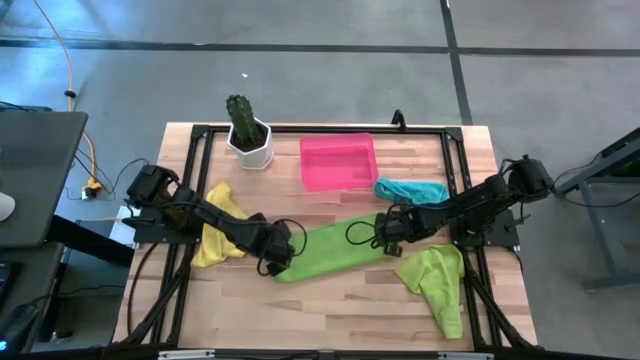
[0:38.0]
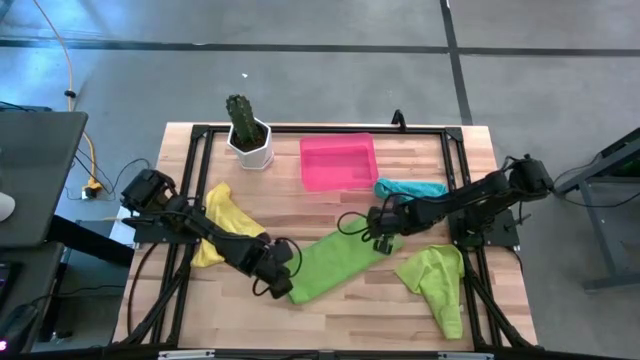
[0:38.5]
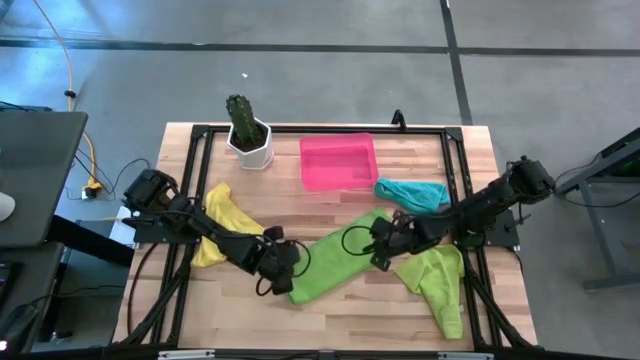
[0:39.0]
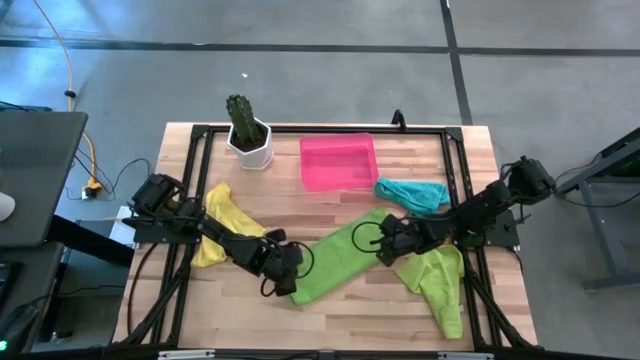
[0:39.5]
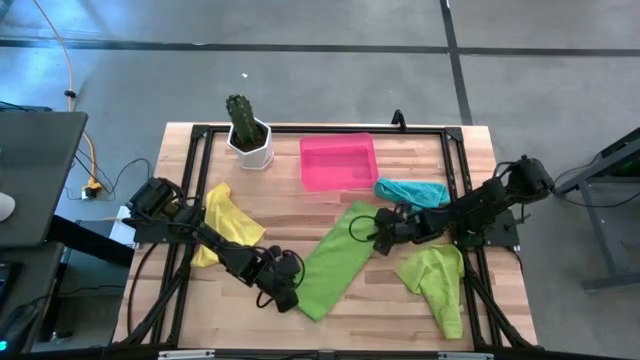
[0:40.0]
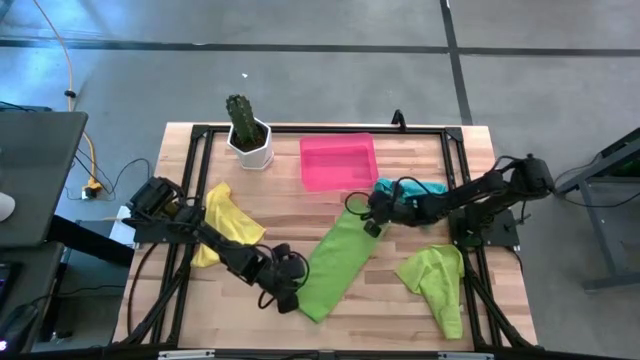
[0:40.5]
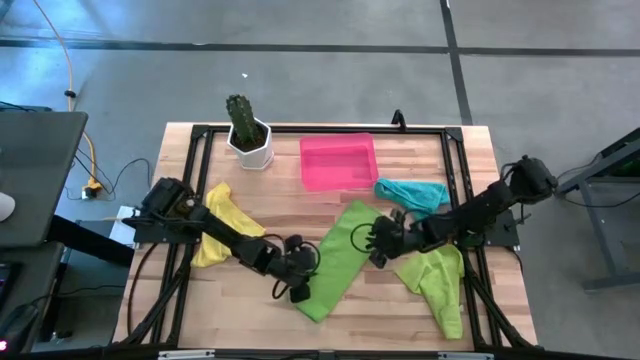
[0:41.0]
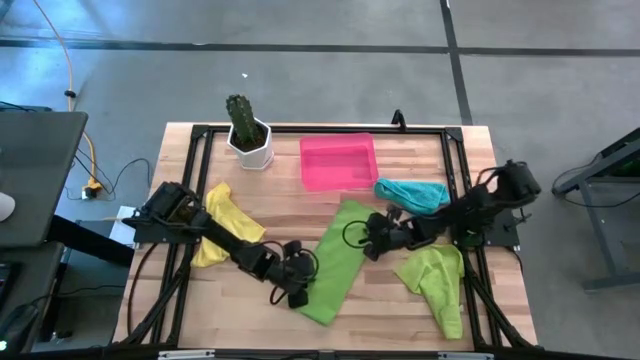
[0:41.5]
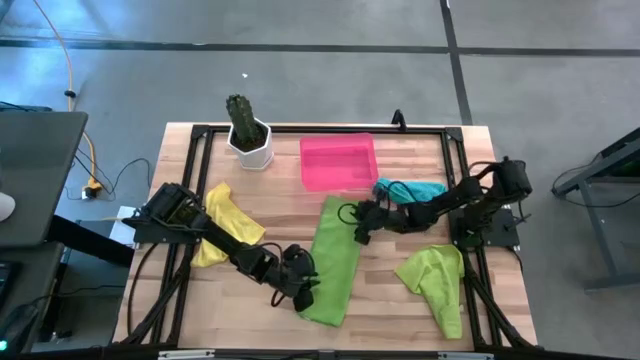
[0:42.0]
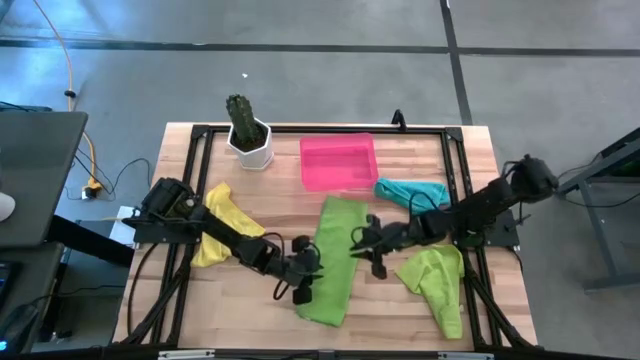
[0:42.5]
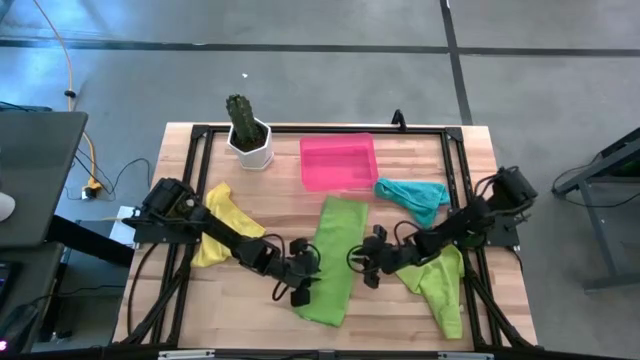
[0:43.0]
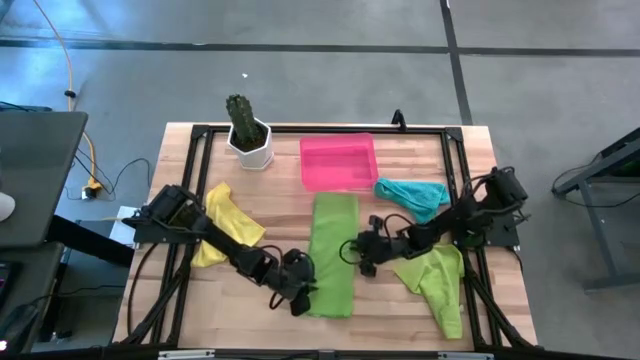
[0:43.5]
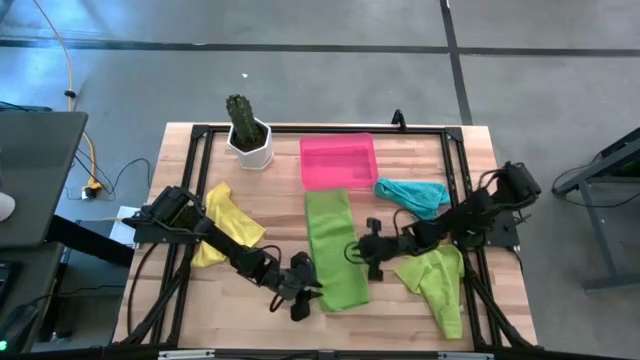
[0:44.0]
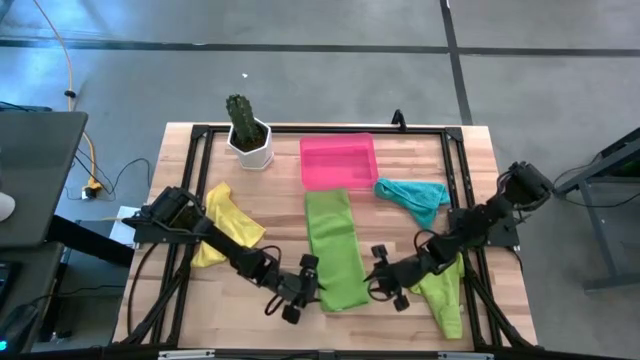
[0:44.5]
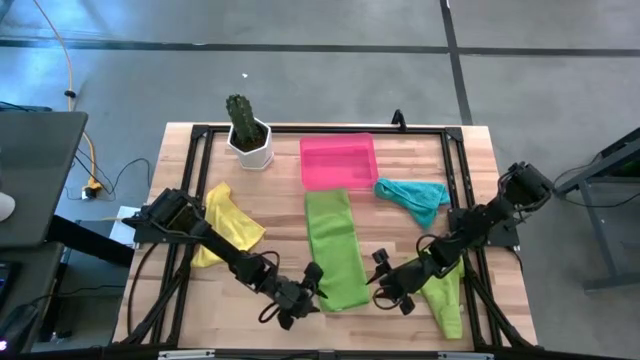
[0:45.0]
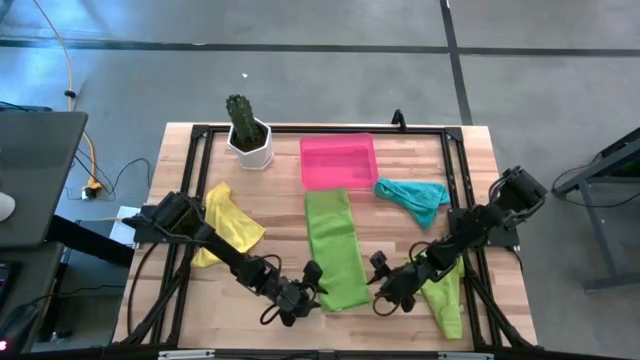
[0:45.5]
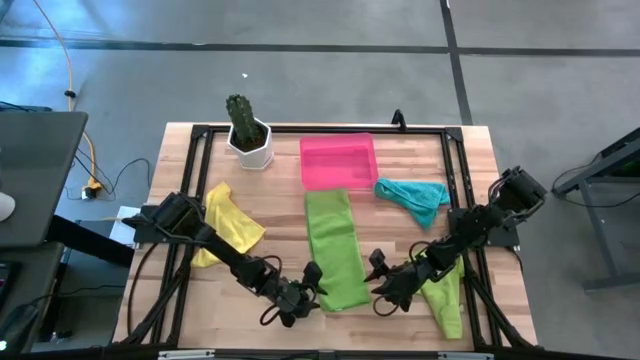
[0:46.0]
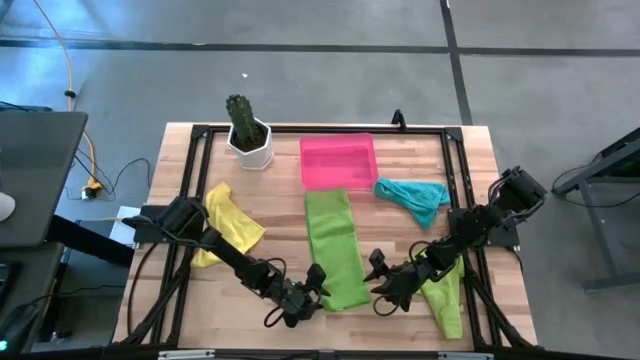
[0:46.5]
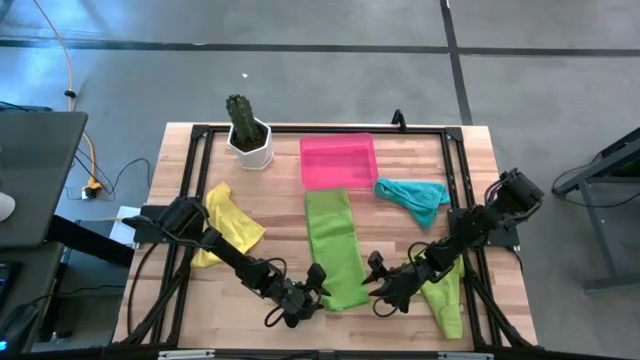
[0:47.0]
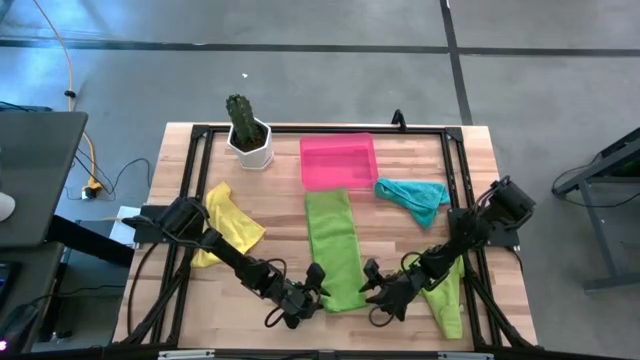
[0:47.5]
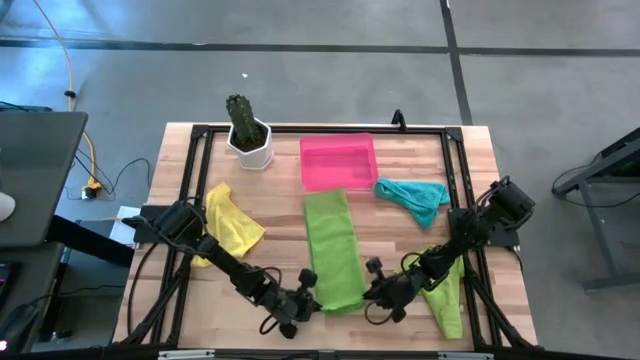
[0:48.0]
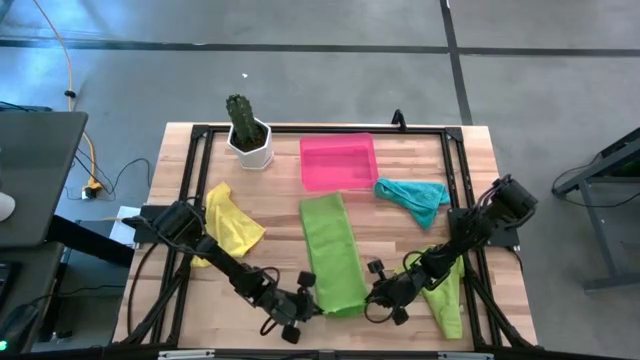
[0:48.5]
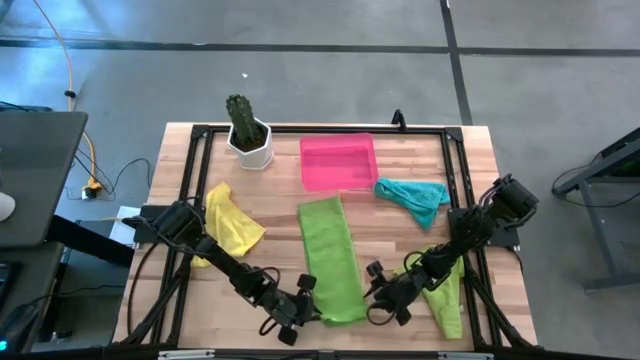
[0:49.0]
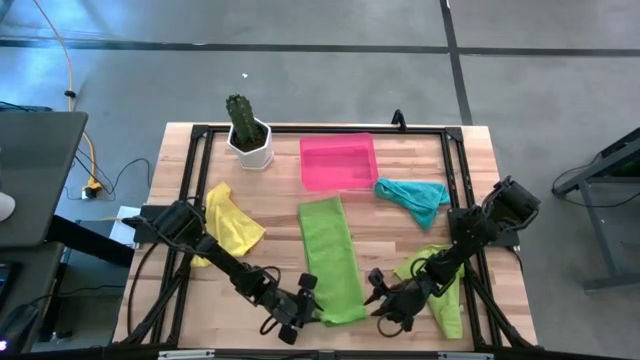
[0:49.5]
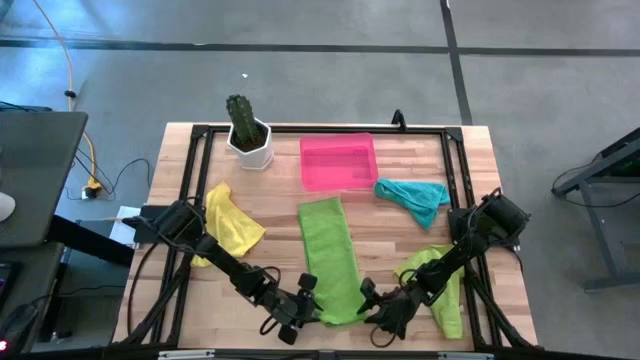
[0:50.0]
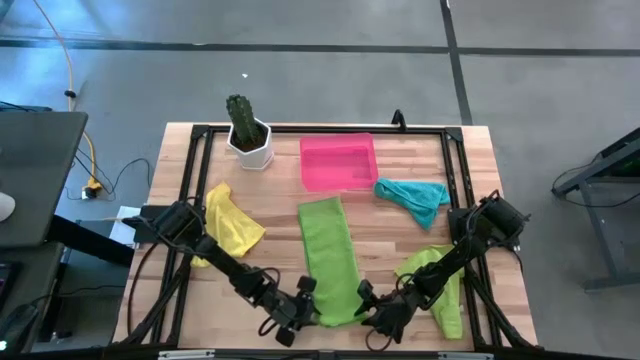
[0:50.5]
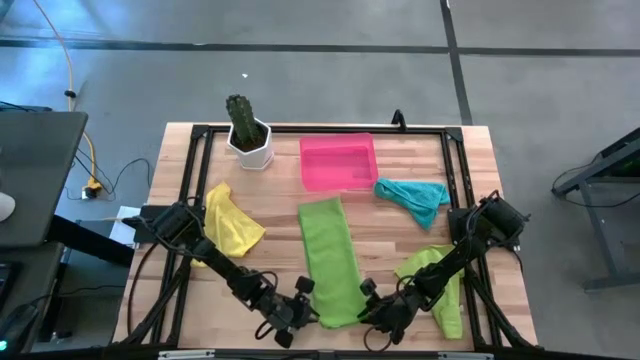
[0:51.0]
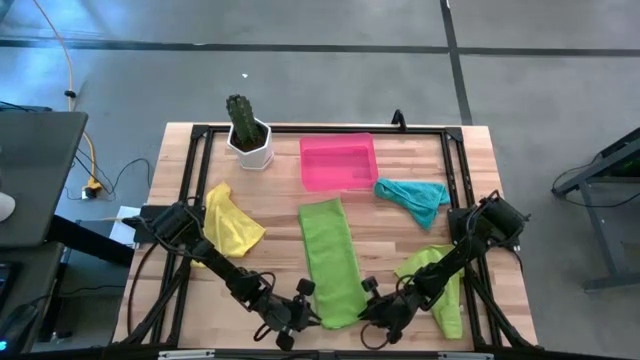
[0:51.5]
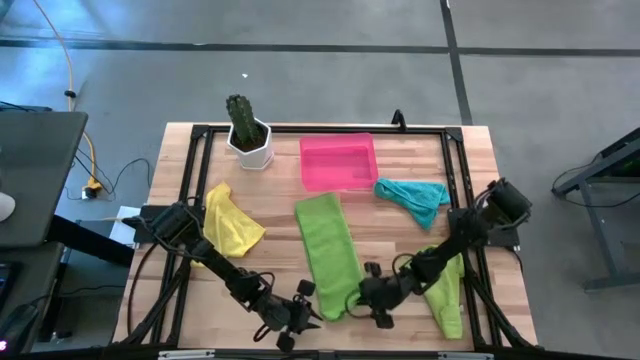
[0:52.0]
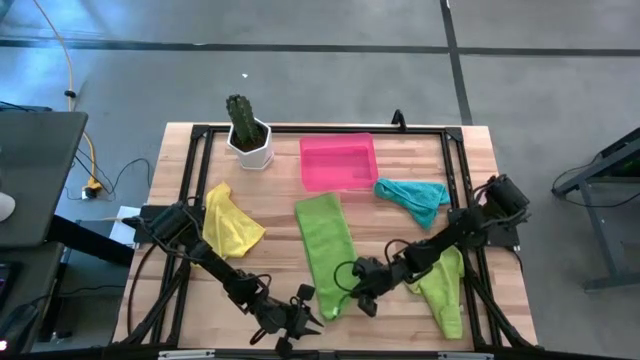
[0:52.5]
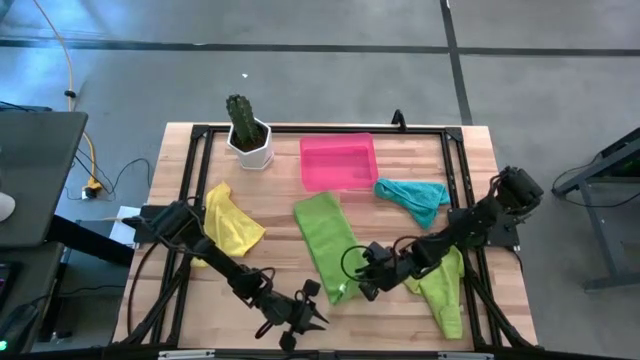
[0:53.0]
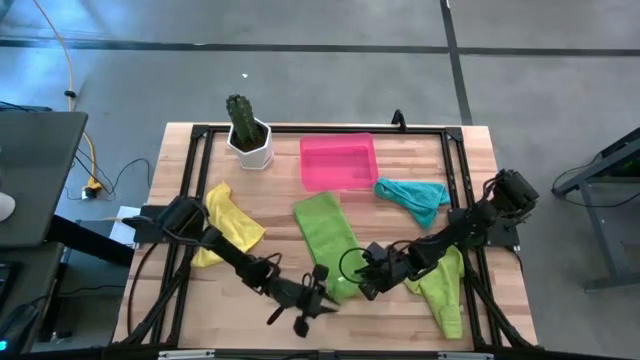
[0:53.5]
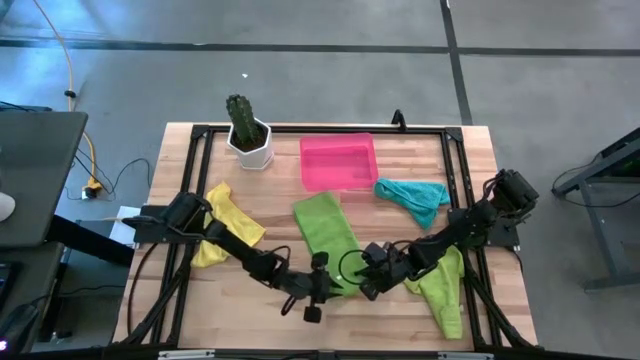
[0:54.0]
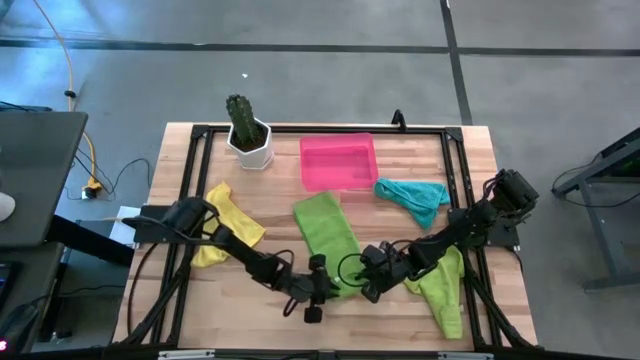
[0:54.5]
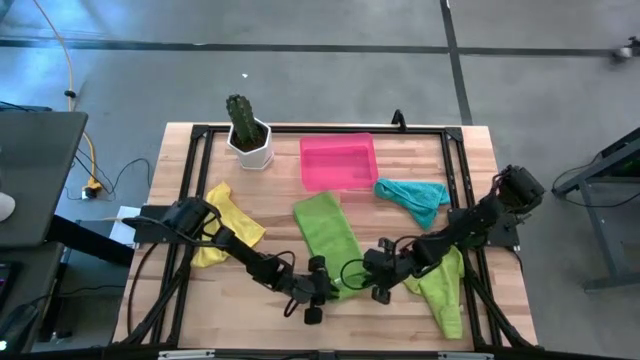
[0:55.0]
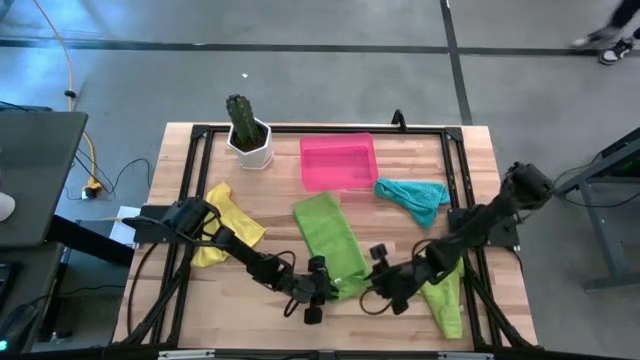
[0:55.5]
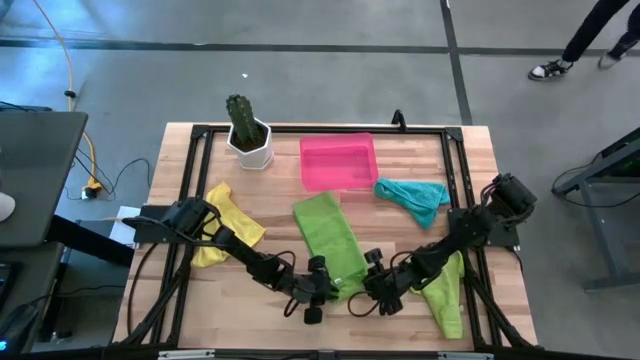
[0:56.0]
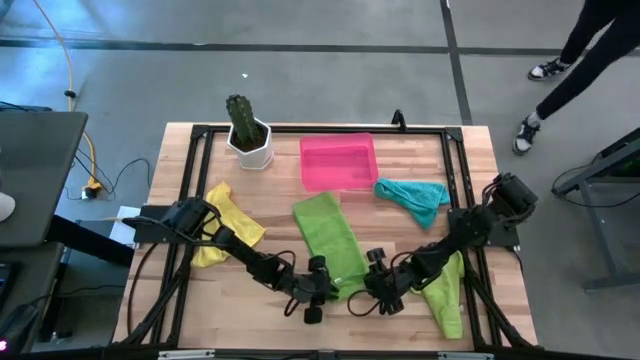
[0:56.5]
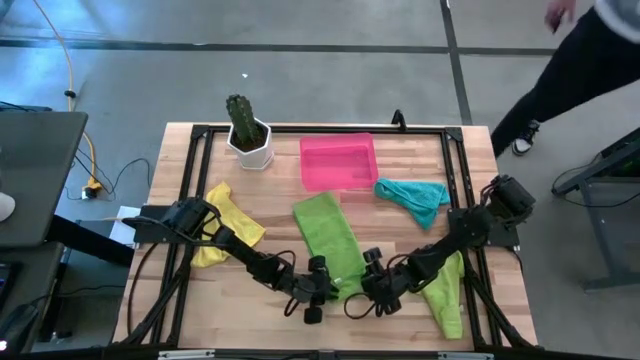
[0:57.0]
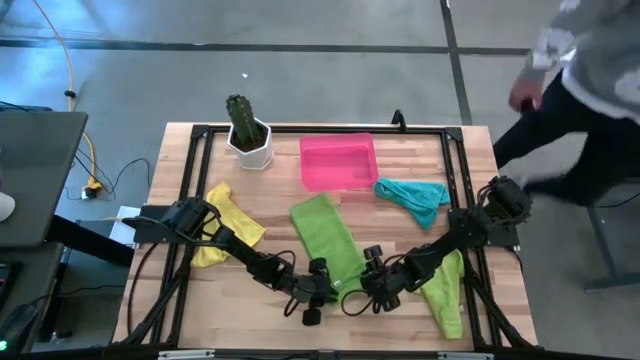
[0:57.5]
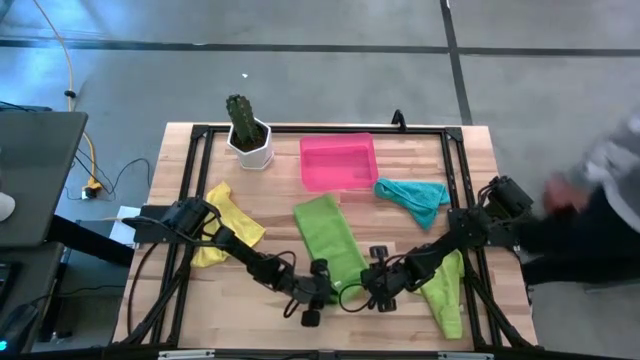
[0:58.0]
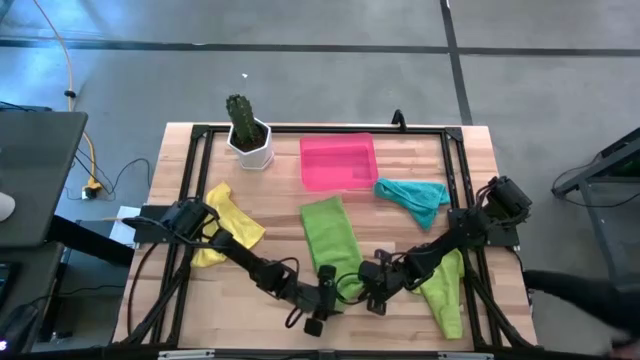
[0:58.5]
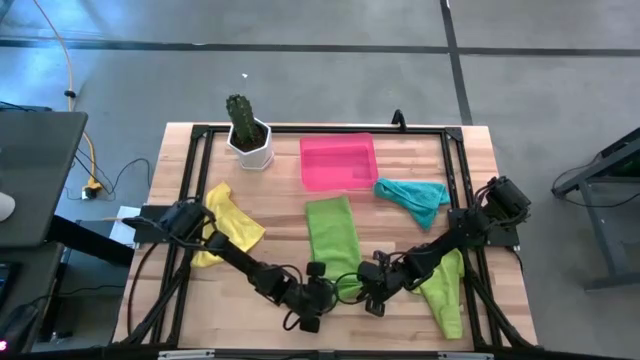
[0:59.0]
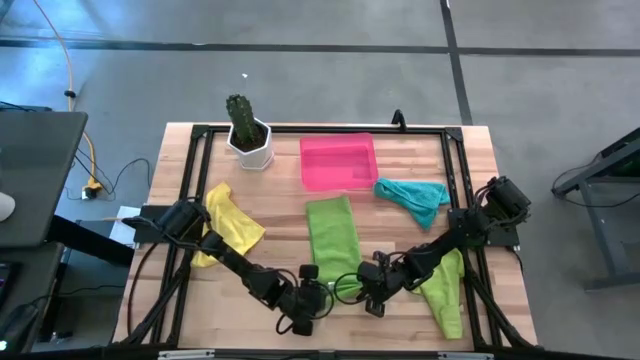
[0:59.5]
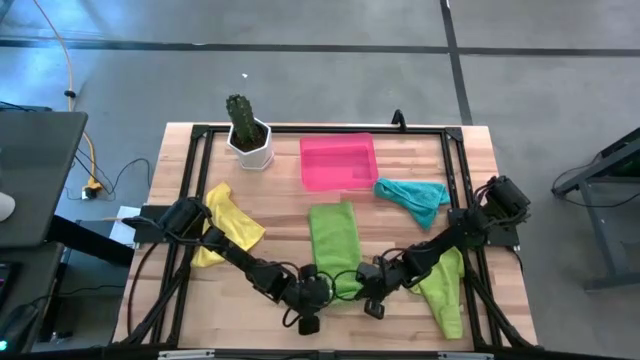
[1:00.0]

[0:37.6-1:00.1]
Task: Roll microfiber towels into tight, uniform cylinder then place into a basket
Roll the green microfiber cloth
